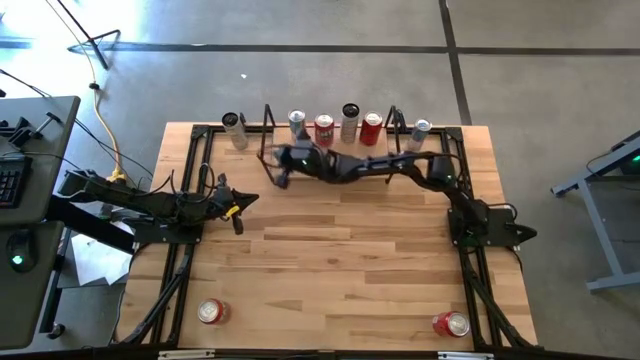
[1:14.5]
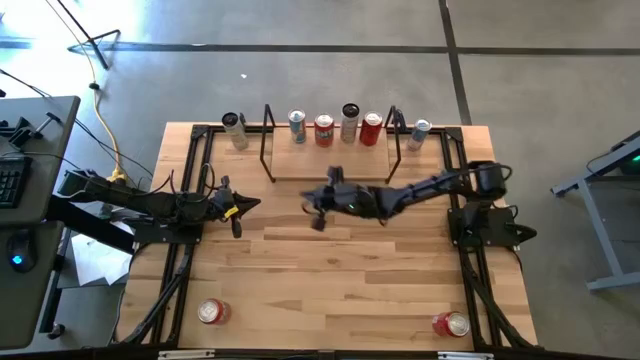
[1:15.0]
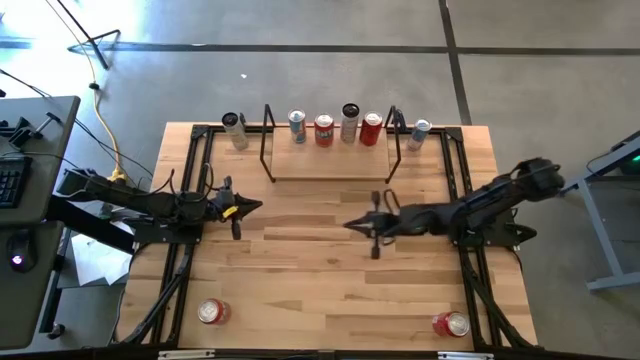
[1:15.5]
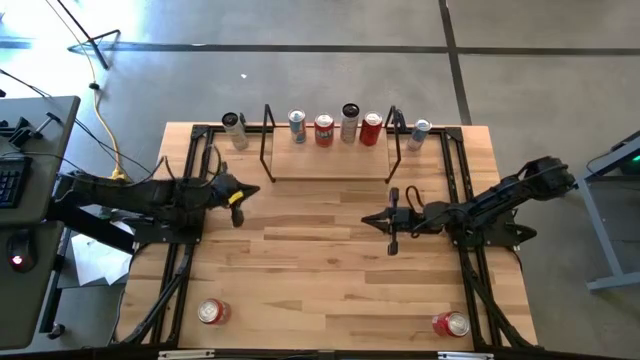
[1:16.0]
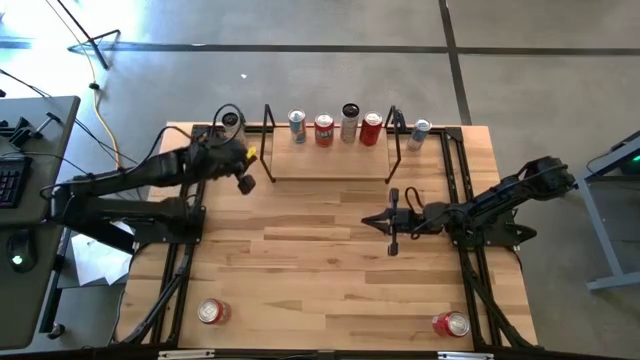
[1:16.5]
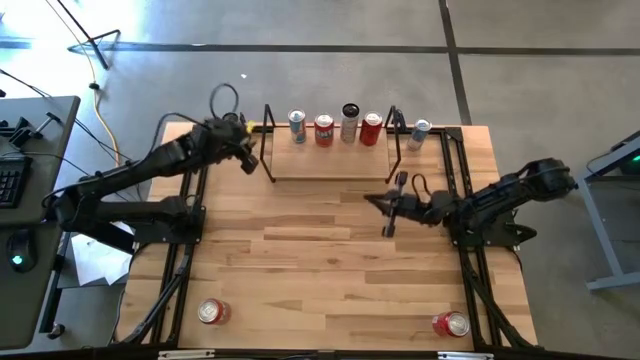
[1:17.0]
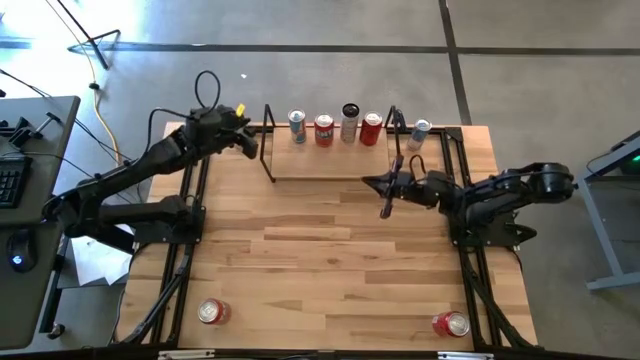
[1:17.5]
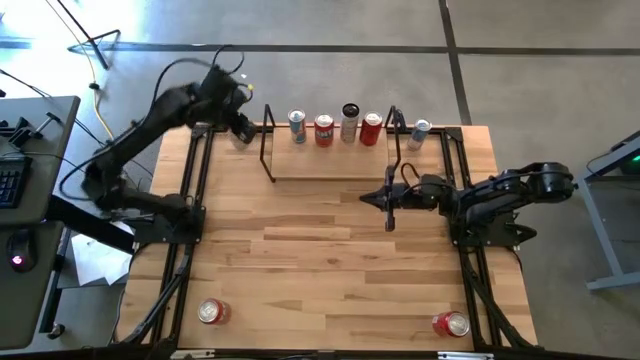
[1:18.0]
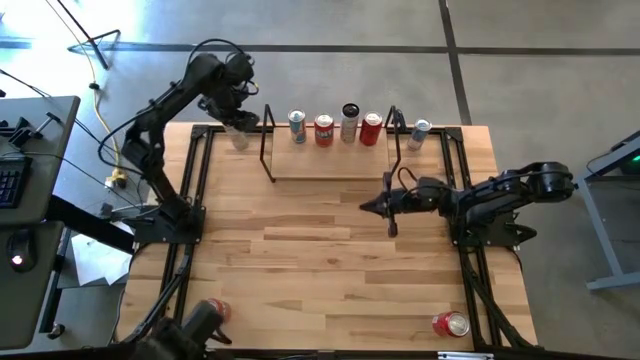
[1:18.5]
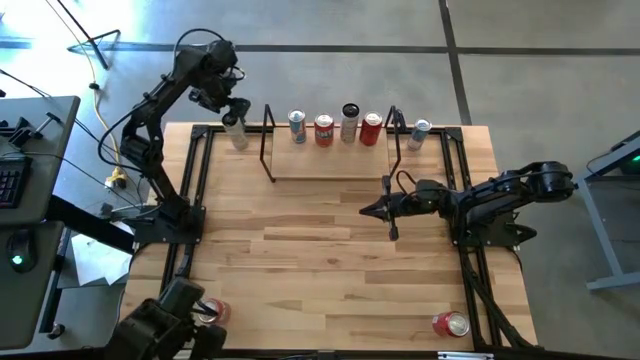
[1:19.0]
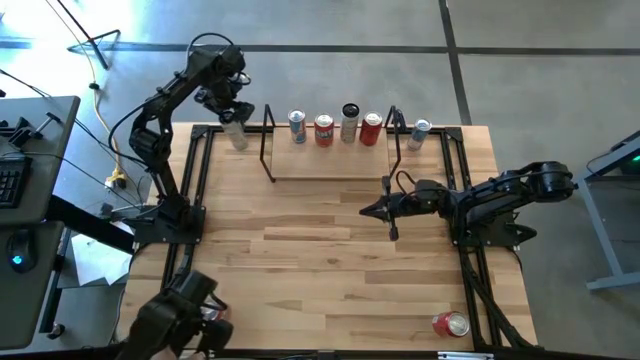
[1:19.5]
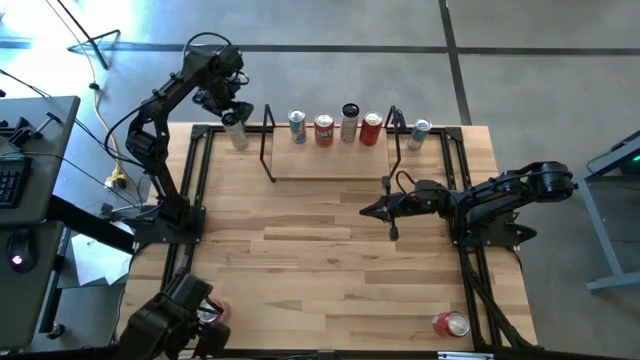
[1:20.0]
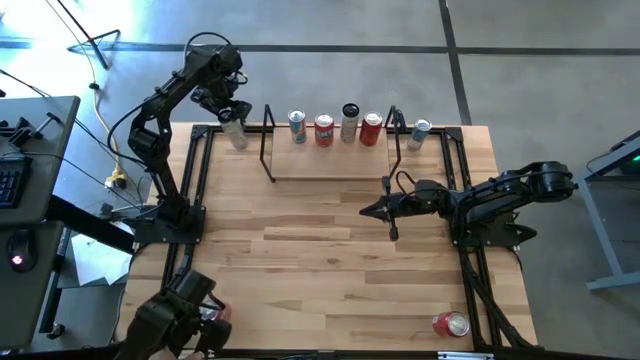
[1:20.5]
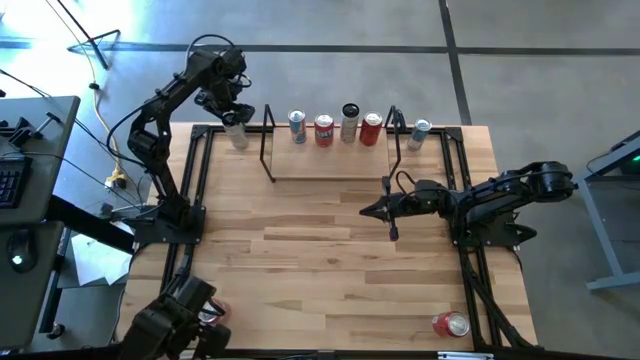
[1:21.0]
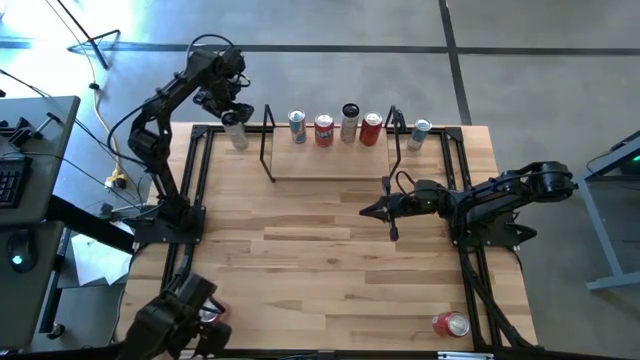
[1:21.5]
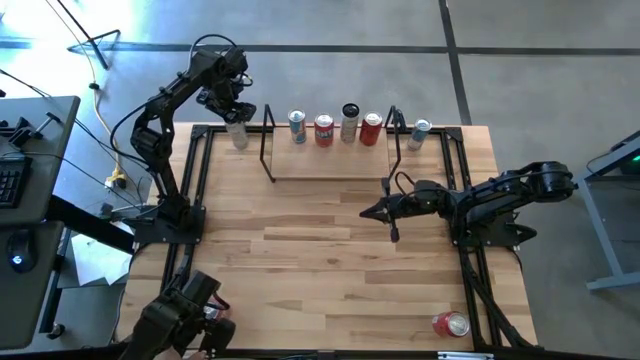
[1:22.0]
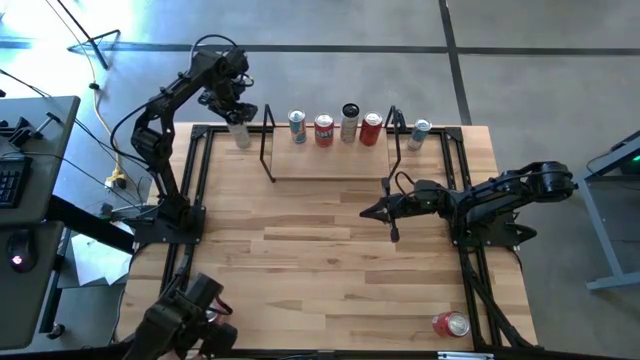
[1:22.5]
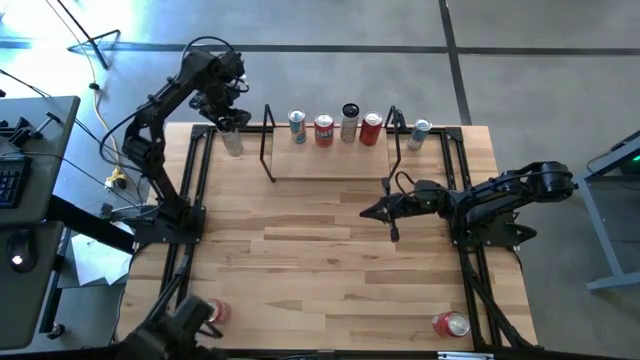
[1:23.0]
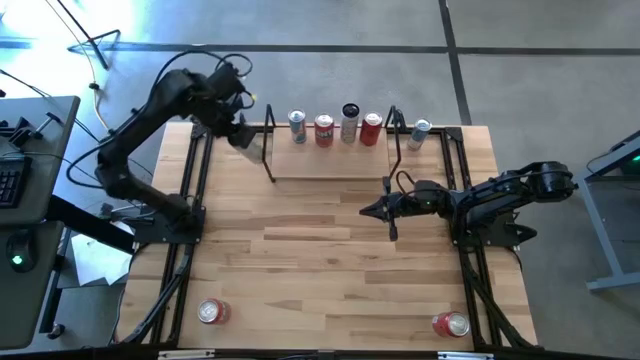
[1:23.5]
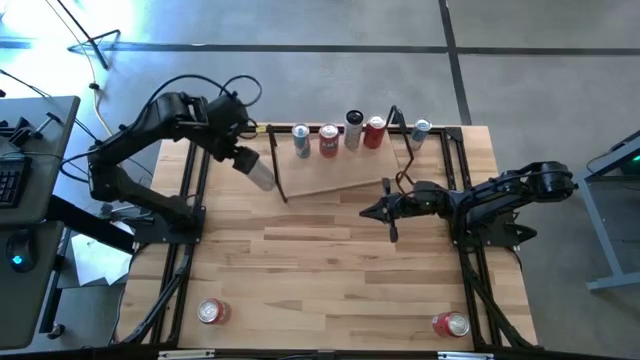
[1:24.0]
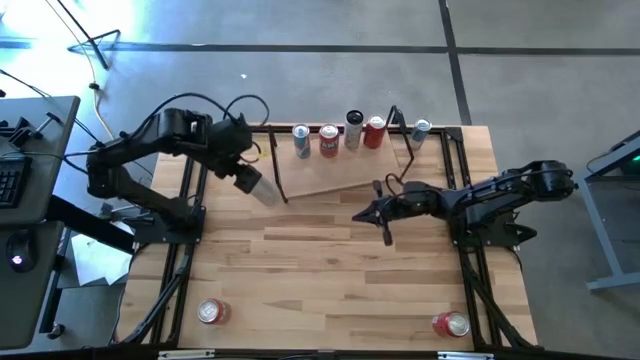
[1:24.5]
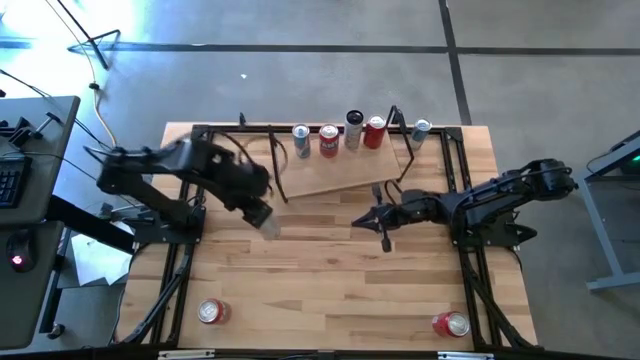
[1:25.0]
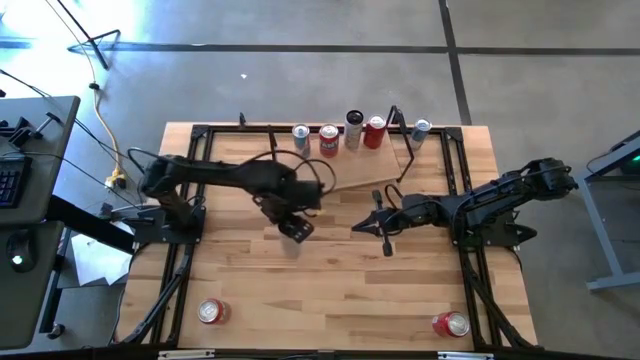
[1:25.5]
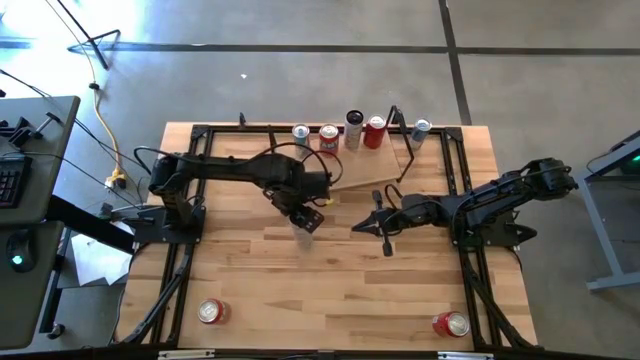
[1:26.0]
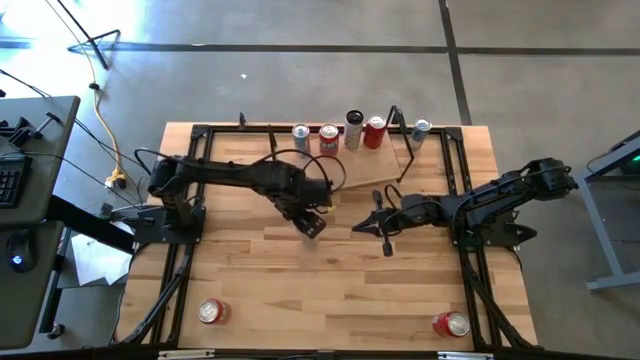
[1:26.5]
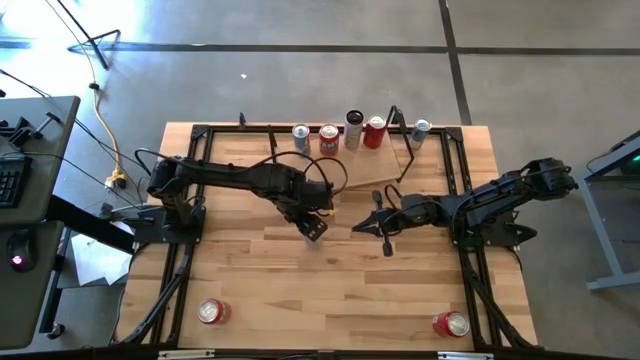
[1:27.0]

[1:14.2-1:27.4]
Task: Place canned beverage on shelf
Move the white-yellow soda can to the center of the table

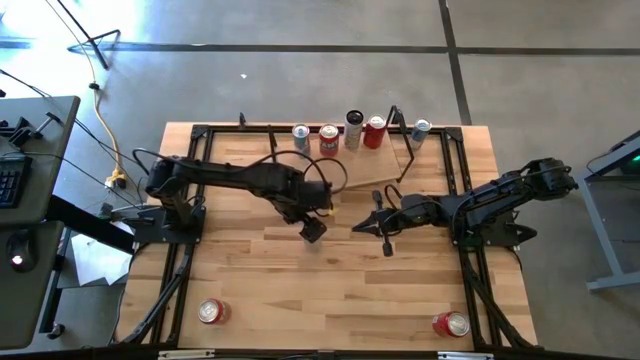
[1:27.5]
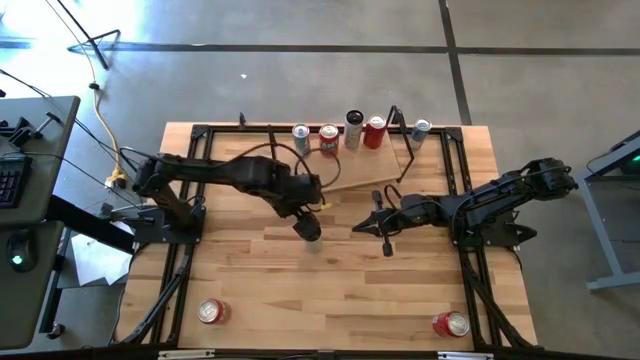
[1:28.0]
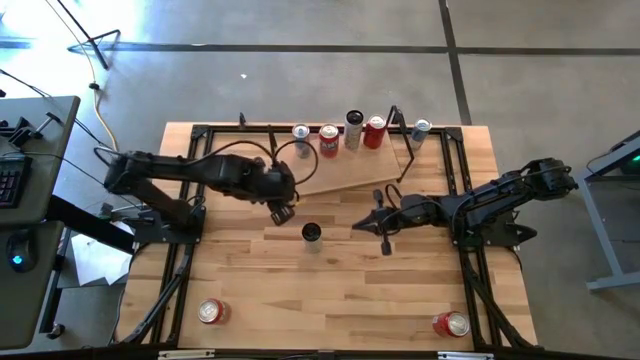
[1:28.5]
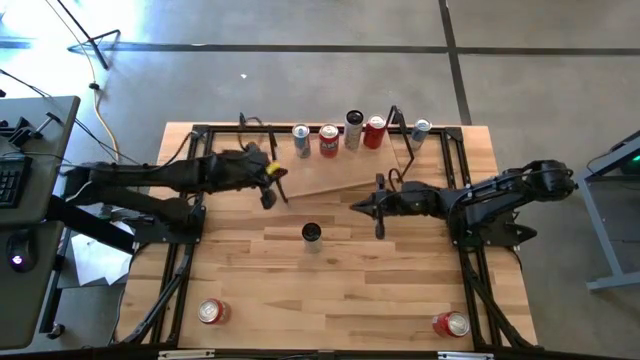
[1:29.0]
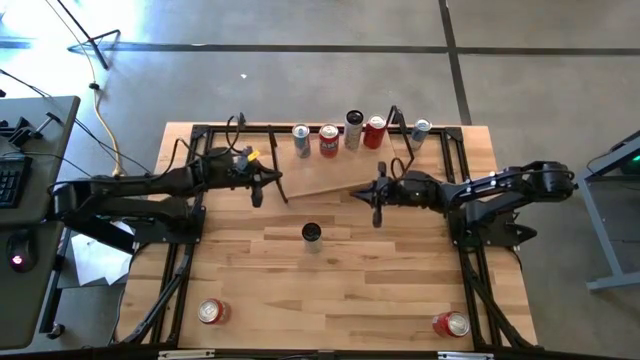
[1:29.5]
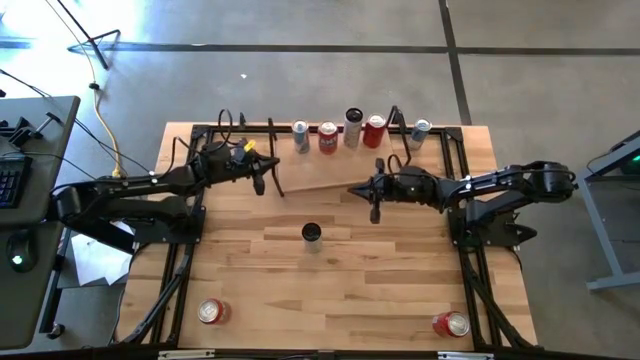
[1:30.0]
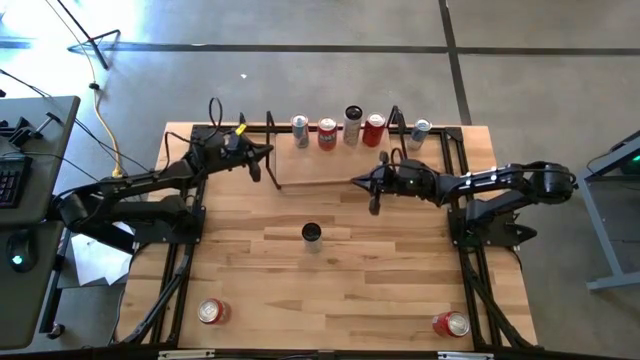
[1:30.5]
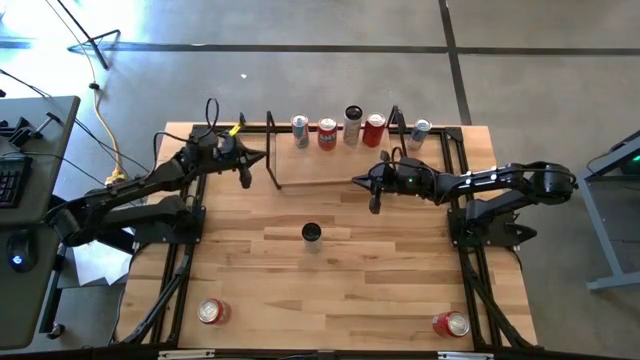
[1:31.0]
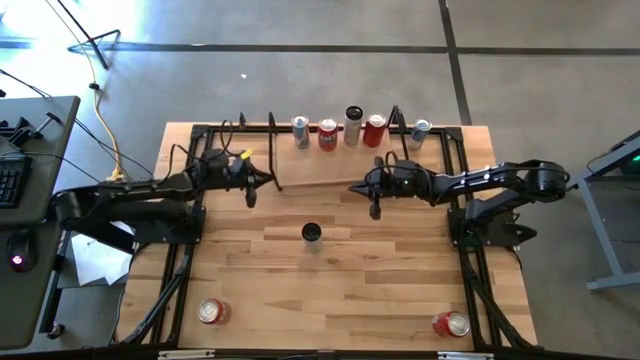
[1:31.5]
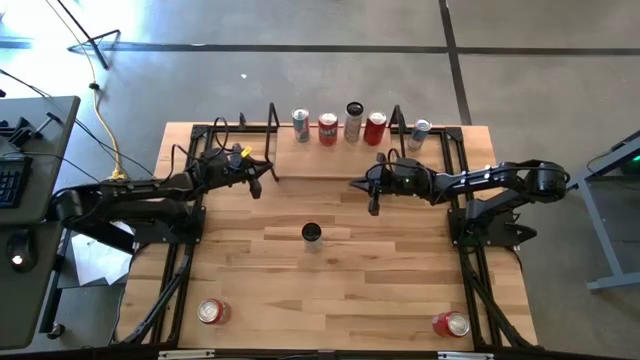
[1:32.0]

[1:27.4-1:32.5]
Adjust the shelf

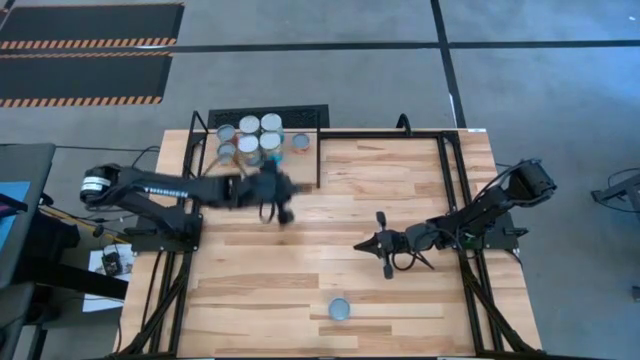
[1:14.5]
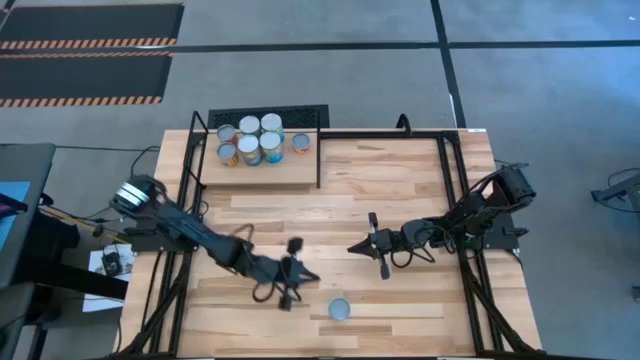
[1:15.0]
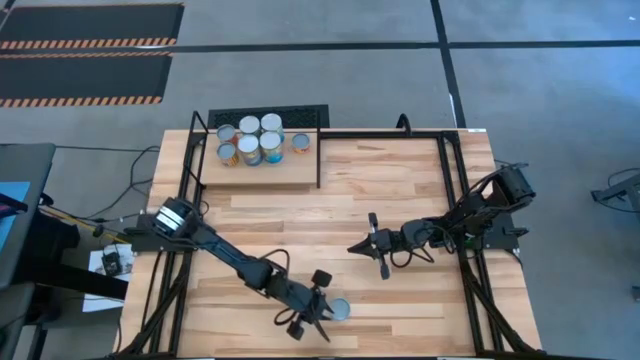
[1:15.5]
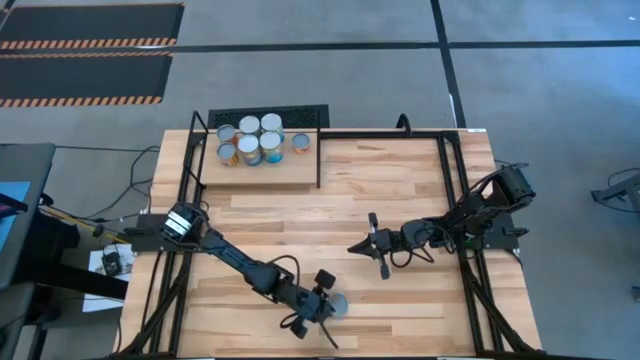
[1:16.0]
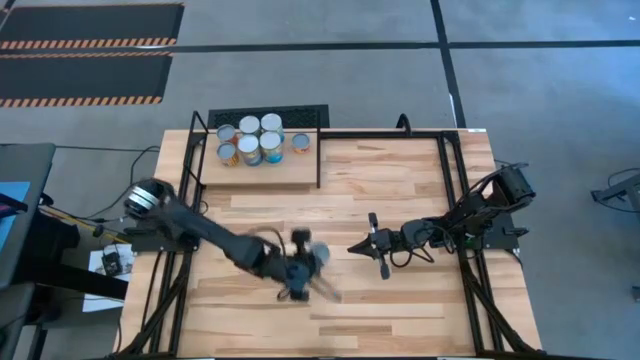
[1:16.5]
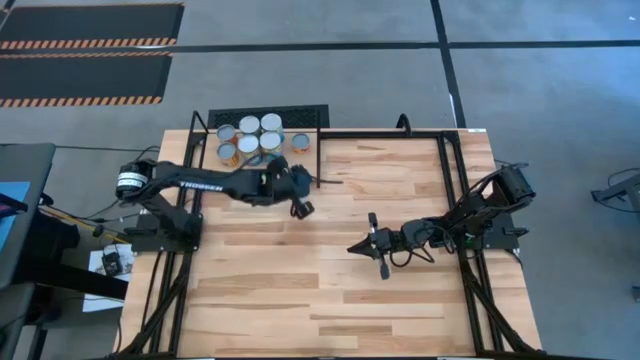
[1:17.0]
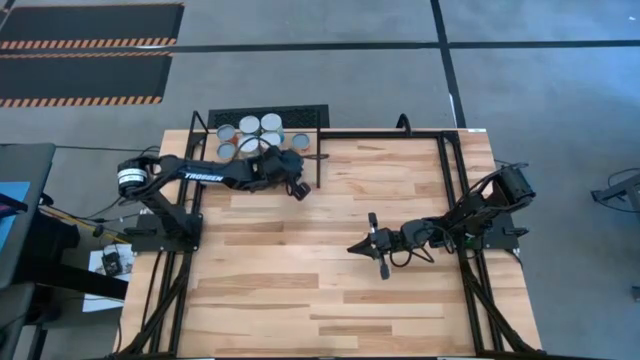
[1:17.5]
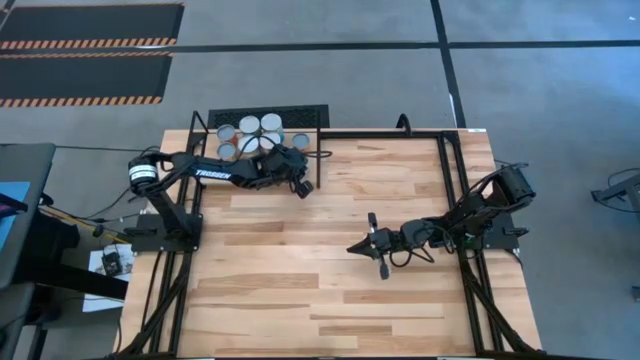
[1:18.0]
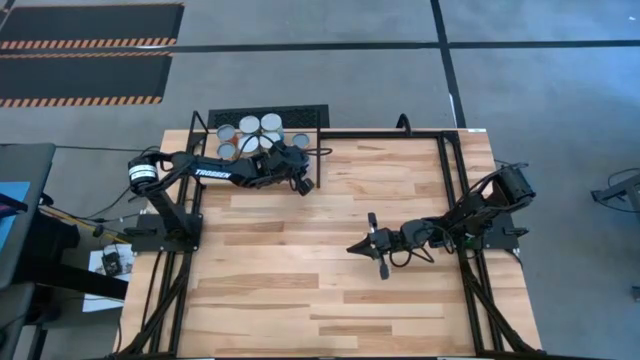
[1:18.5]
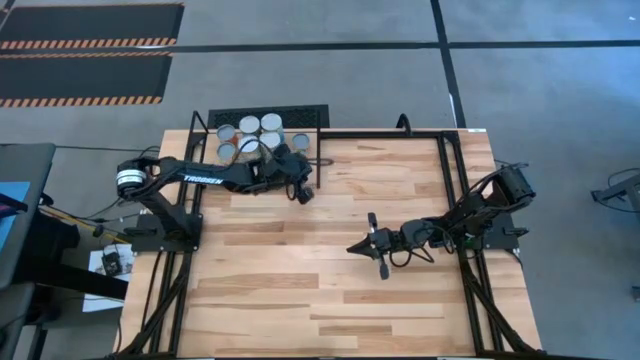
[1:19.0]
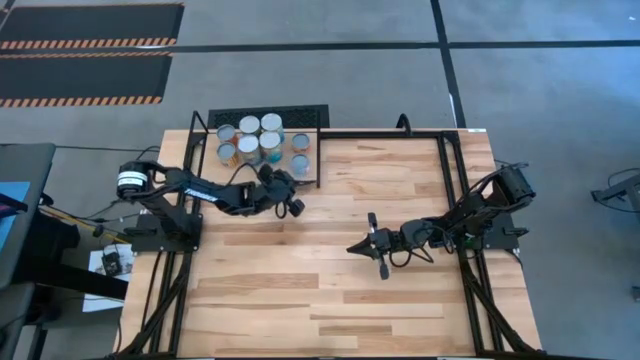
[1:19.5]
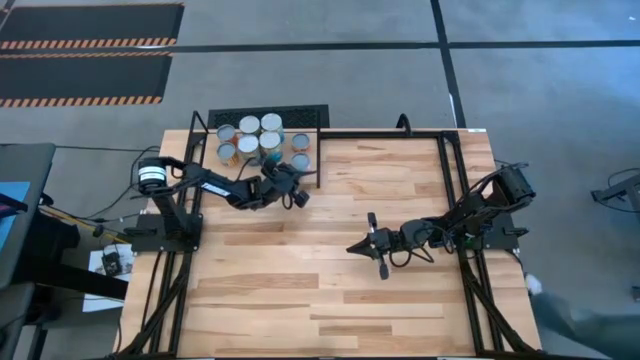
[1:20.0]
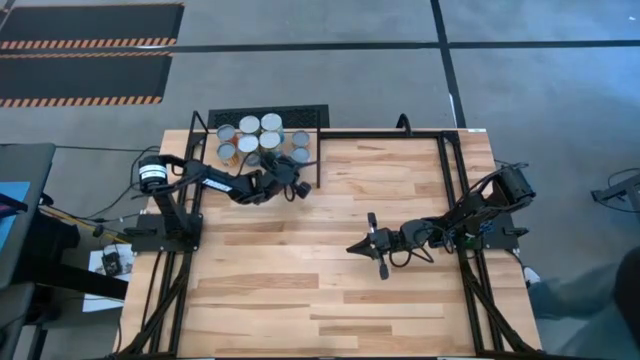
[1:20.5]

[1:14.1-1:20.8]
Task: Pick and place cans onto a shelf
Put the small canned salmon on the shelf aligned with the other small canned pineapple rings
